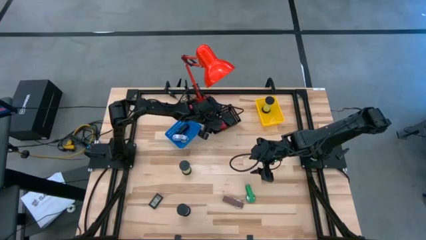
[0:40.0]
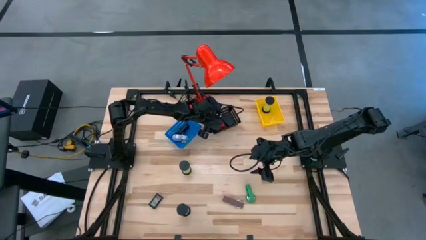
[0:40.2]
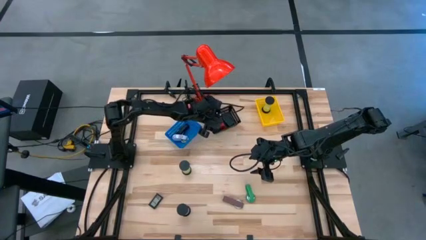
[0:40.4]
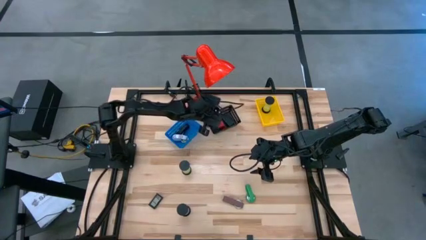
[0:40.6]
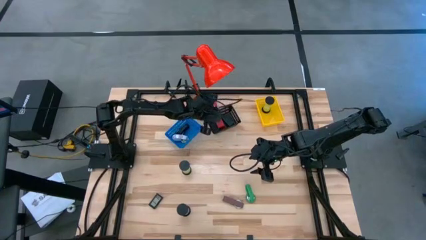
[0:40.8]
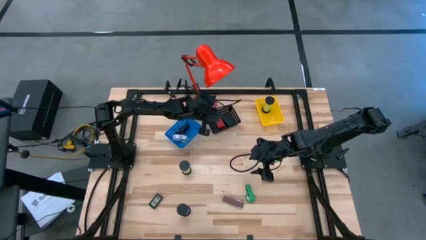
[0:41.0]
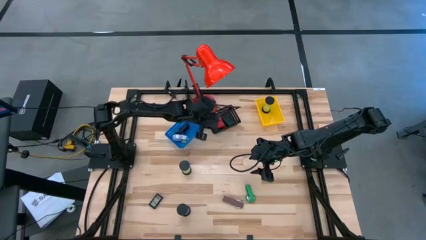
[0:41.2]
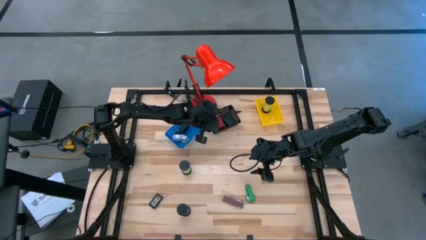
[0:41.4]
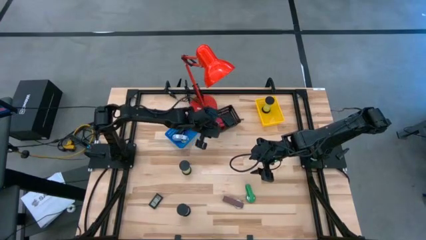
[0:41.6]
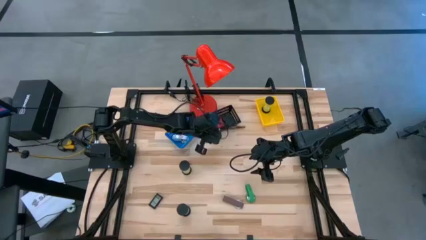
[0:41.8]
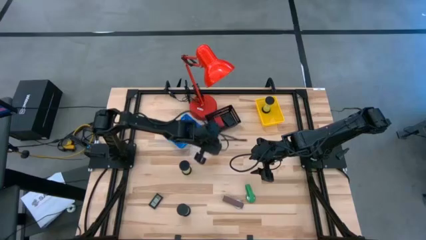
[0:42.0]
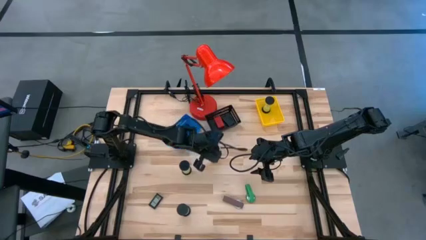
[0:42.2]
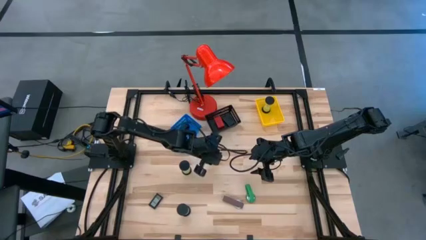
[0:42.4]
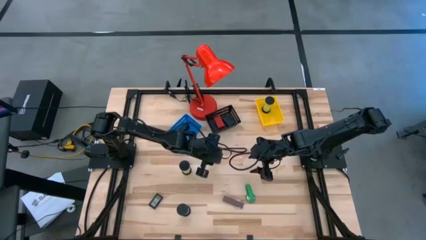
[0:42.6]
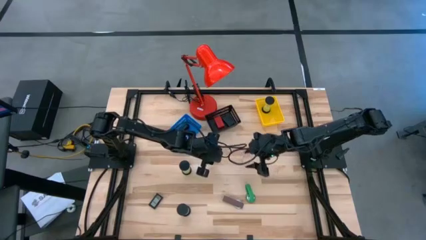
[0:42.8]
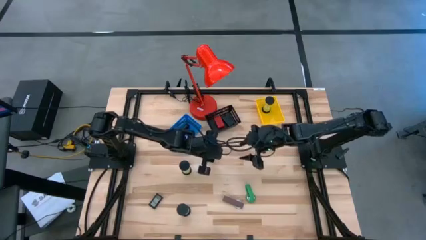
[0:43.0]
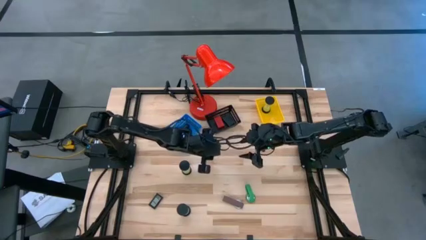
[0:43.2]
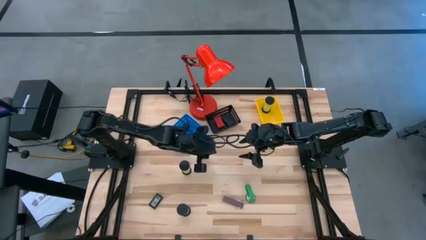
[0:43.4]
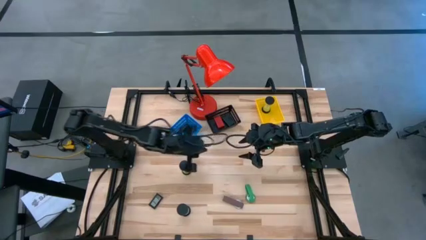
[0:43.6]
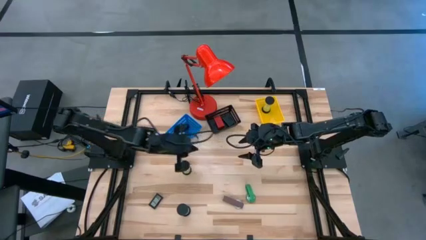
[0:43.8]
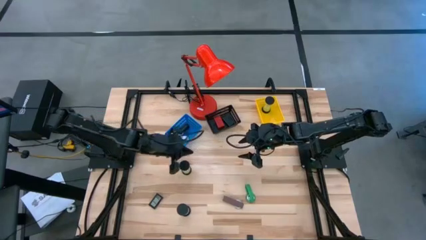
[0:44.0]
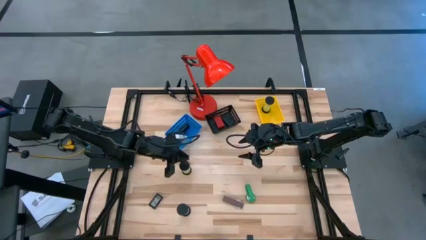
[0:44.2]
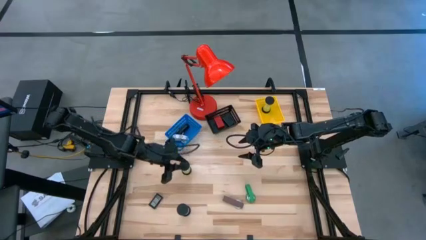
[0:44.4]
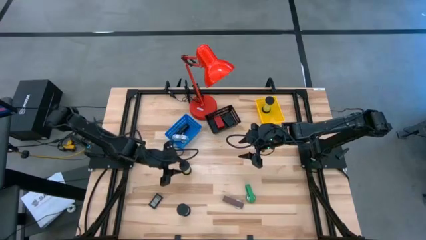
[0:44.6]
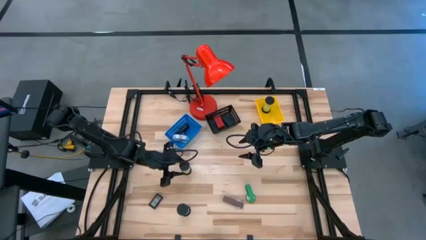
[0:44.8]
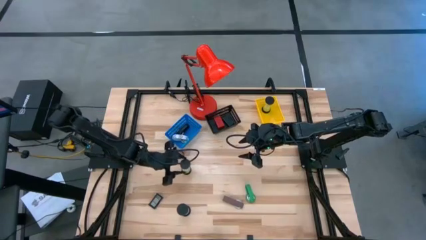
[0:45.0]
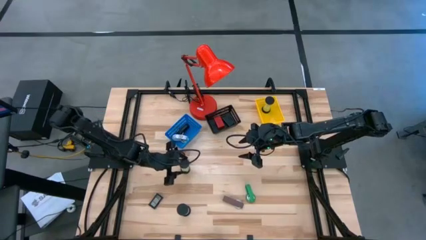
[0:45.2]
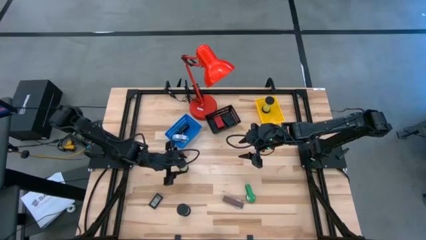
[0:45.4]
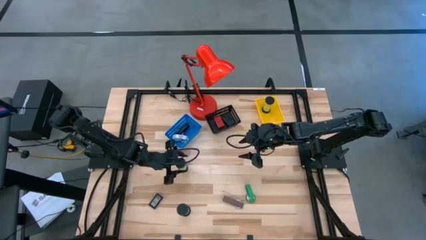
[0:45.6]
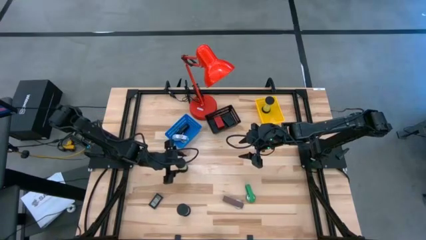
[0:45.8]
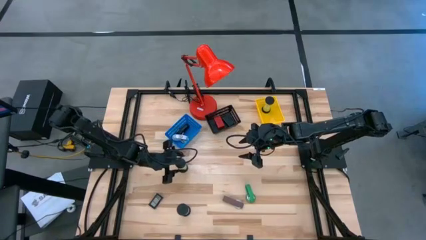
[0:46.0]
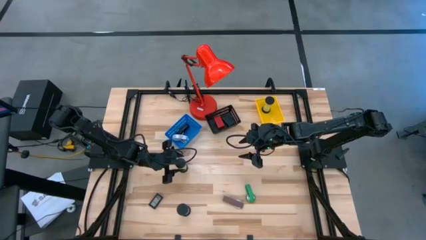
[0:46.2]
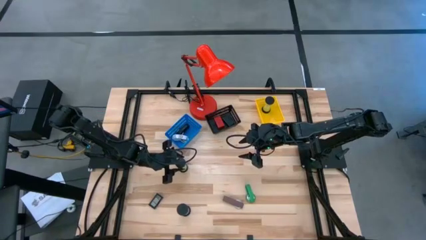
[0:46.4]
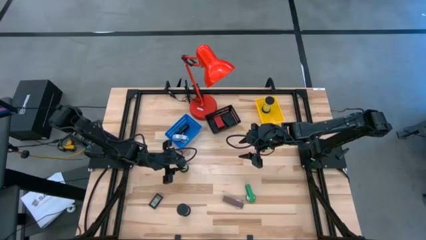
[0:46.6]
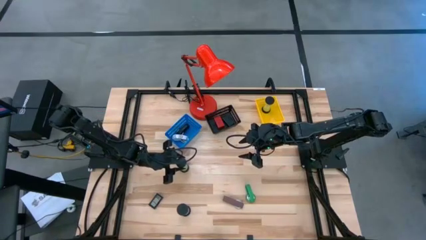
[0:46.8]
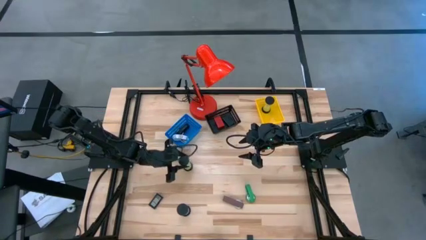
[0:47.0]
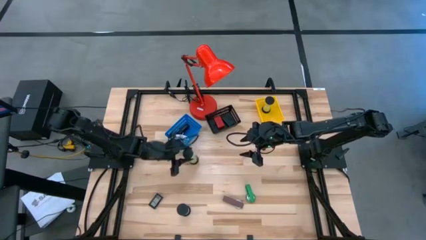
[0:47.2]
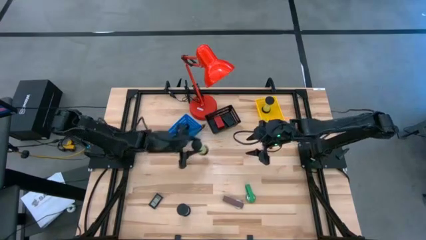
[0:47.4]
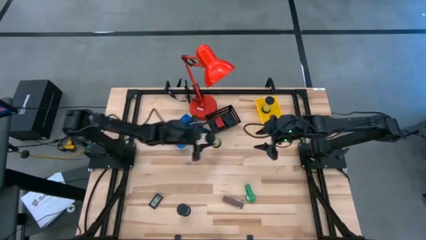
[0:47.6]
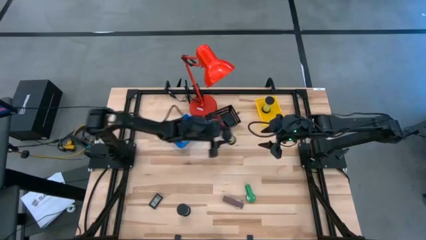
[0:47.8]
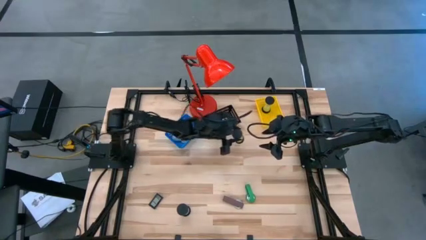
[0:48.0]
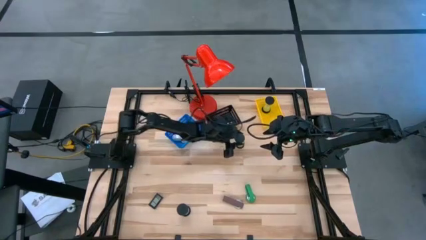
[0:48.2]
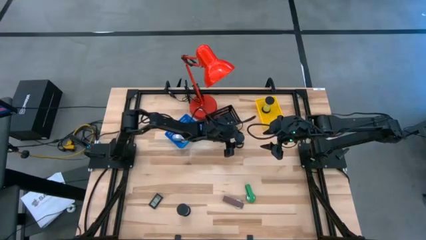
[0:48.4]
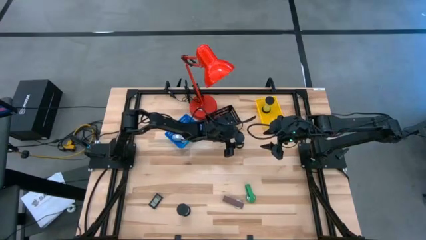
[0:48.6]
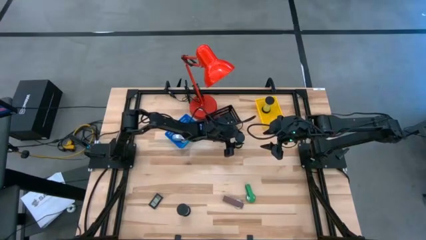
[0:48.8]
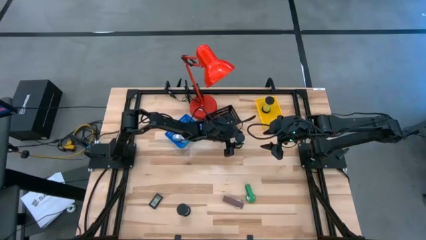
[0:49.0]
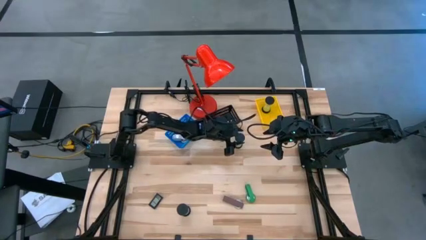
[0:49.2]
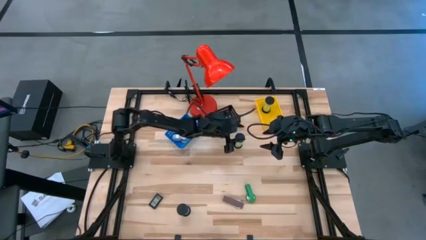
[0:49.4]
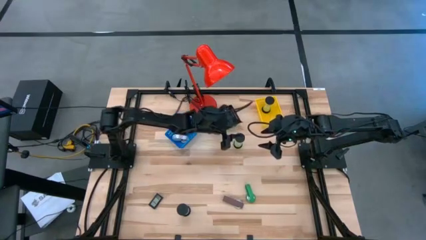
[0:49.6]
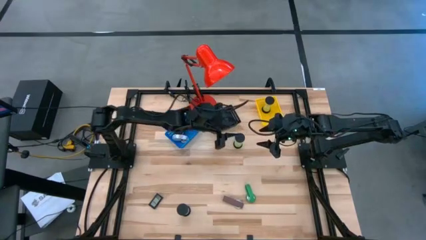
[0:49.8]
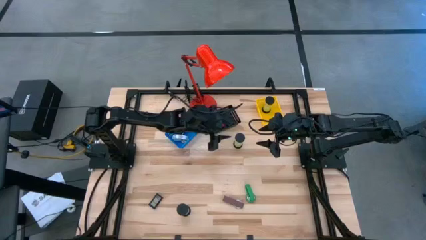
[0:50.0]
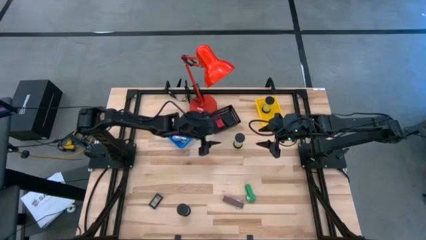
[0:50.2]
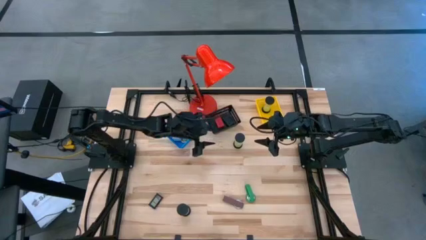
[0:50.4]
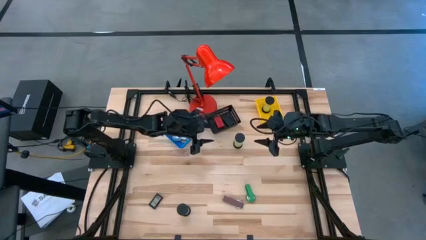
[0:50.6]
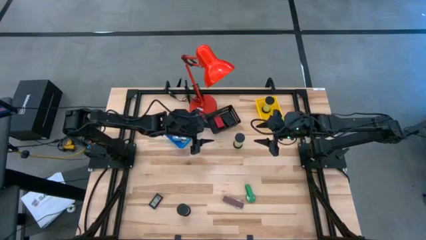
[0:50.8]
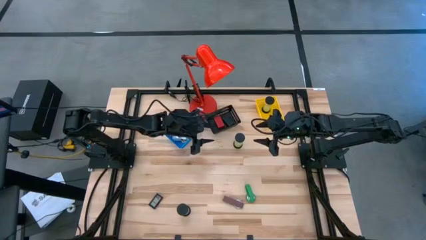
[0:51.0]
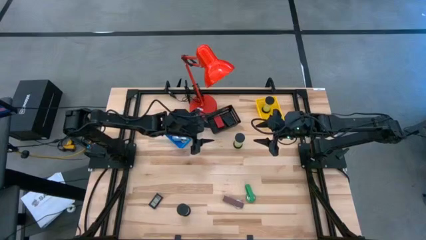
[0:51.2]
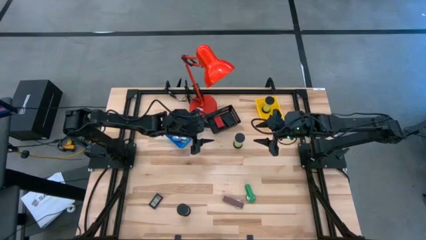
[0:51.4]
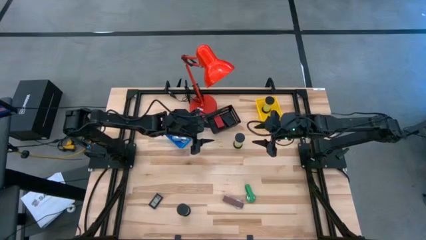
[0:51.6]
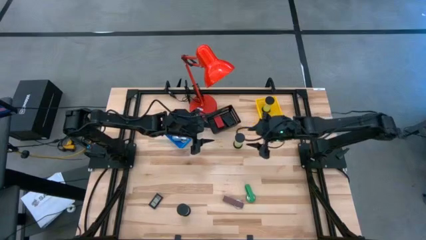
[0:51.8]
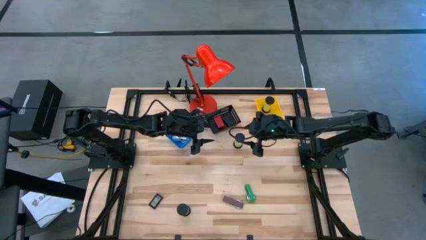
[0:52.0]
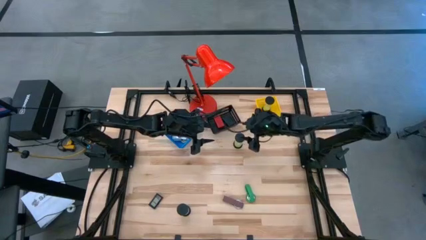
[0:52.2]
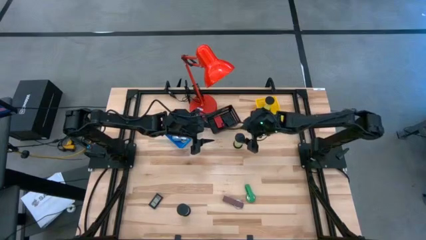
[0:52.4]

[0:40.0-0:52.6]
Task: Pick & Place Office items
Put the green hourglass into the yellow bin

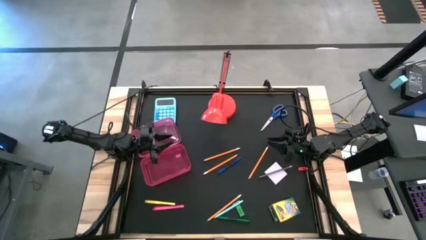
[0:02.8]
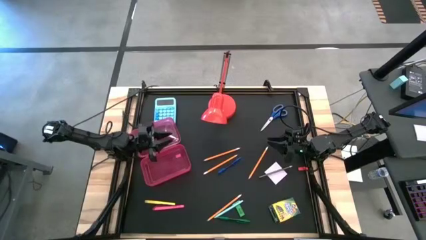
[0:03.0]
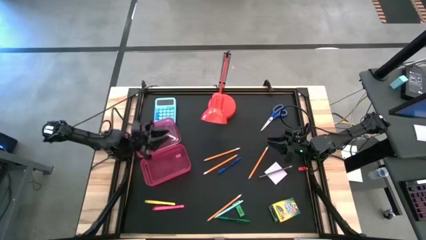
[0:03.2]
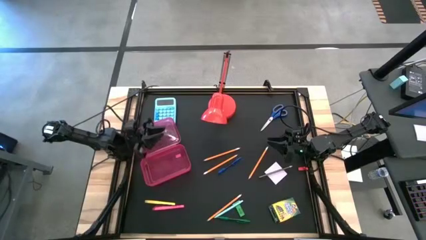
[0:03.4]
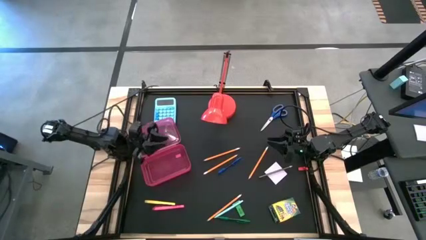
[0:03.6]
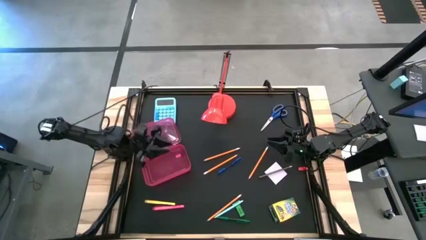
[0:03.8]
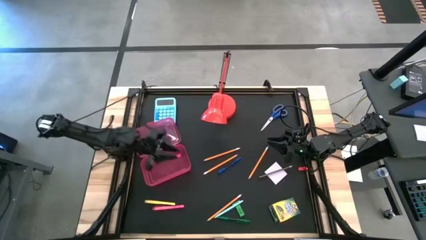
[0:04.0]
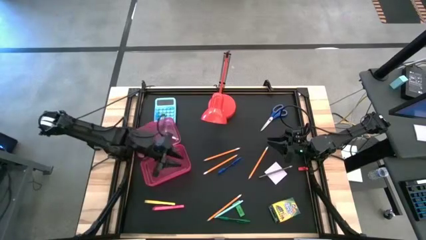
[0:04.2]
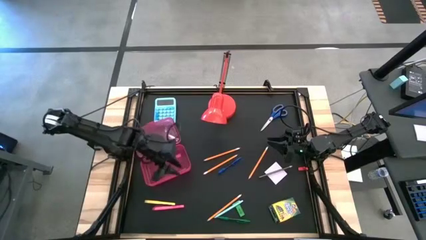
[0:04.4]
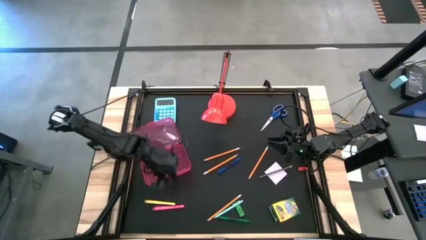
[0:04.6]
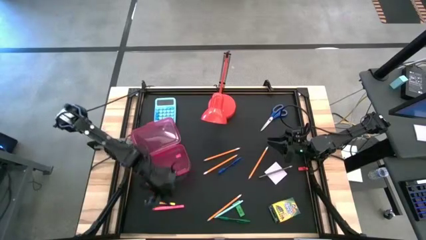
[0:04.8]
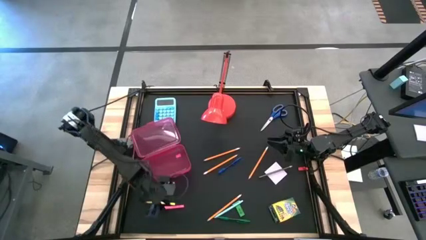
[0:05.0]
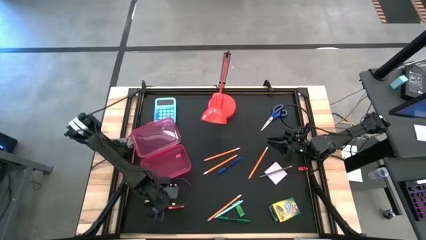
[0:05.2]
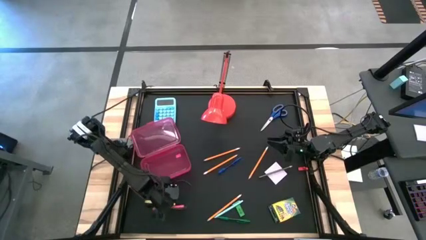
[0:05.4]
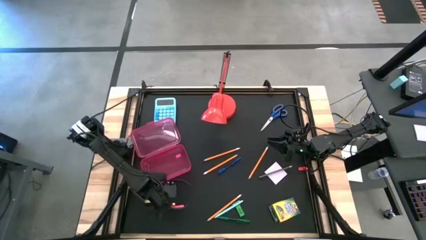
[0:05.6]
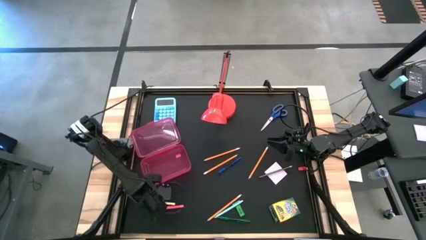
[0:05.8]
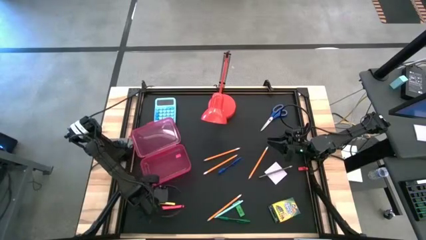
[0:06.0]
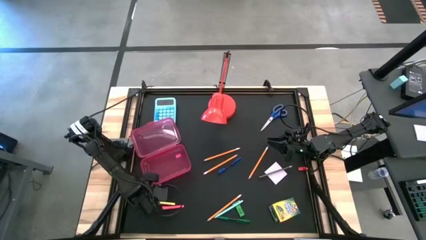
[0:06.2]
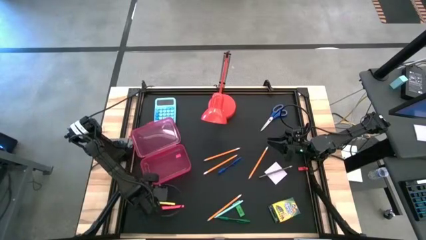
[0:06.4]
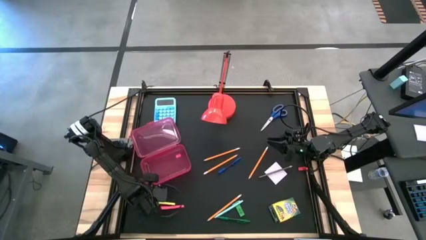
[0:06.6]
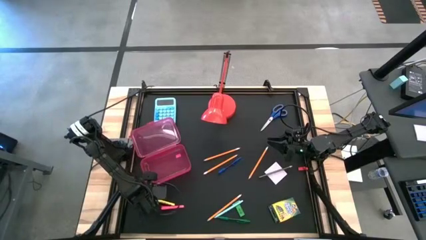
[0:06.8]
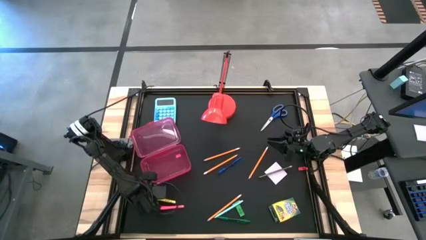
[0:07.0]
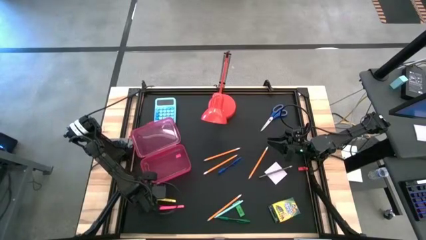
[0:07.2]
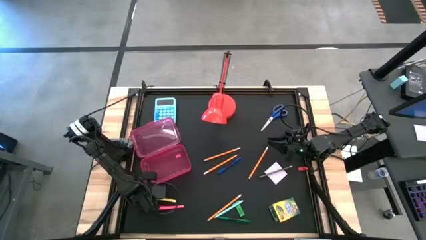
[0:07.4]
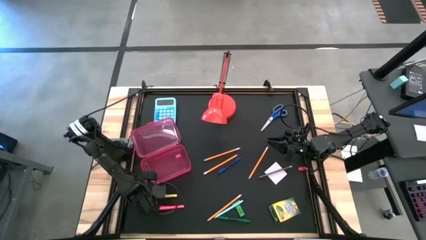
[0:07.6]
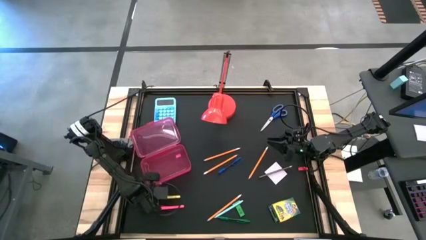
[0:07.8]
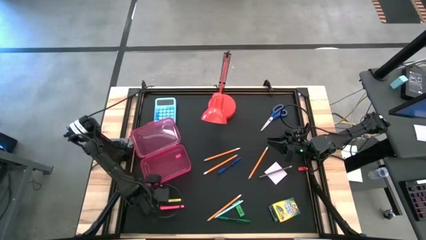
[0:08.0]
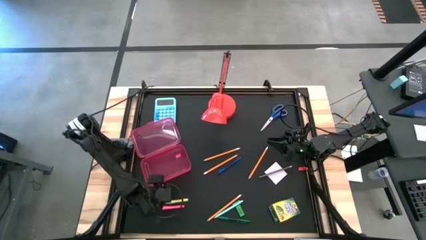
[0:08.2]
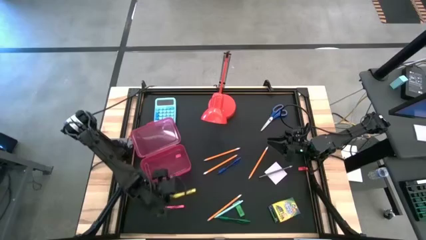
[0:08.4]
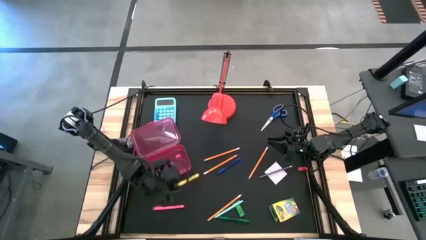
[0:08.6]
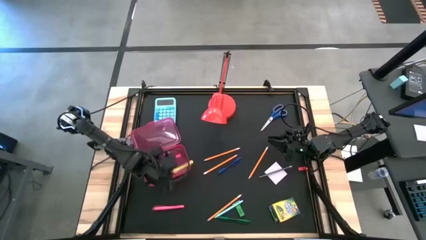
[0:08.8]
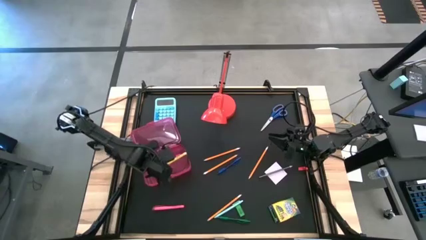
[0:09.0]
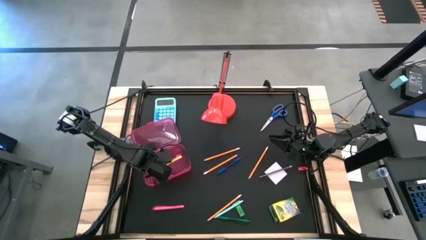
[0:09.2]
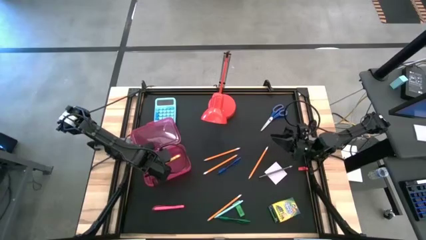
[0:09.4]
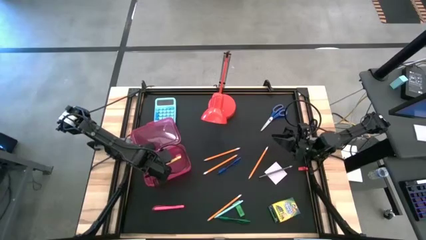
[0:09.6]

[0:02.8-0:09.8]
Task: Pack school essentials
Put the yellow pen into the red supply box
